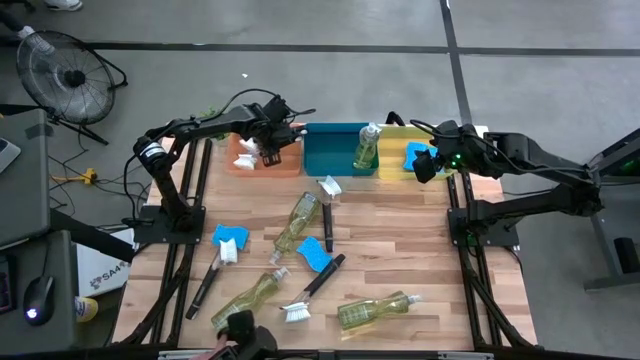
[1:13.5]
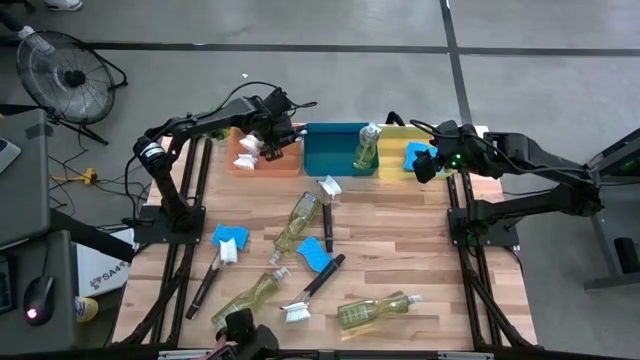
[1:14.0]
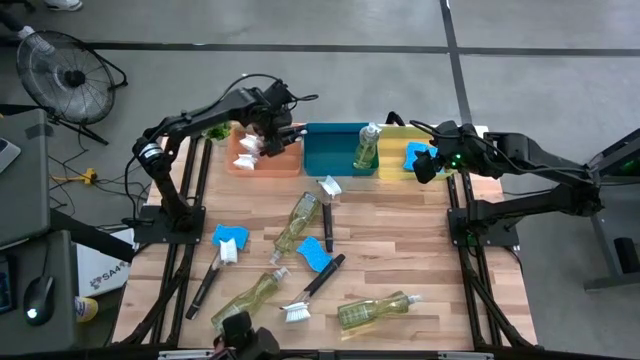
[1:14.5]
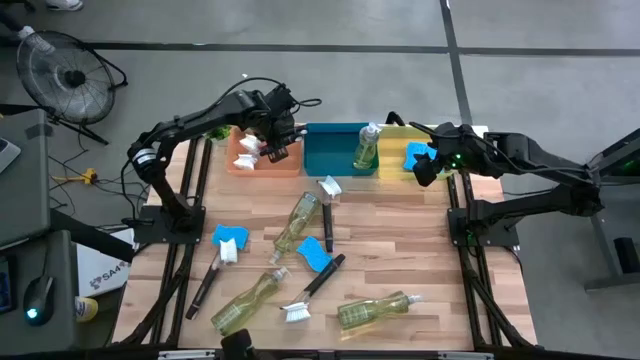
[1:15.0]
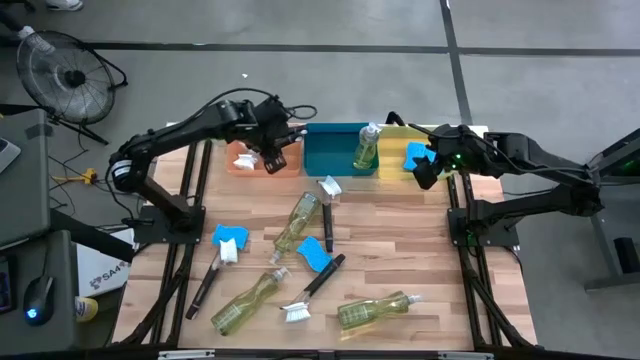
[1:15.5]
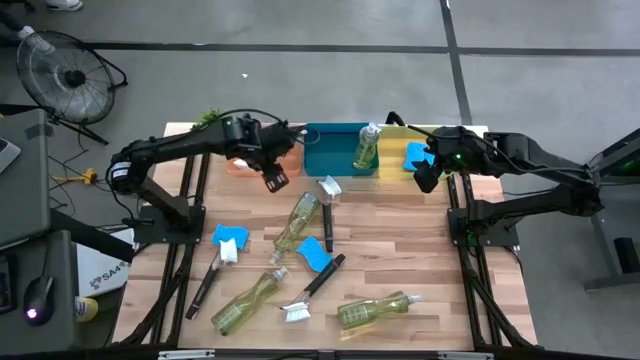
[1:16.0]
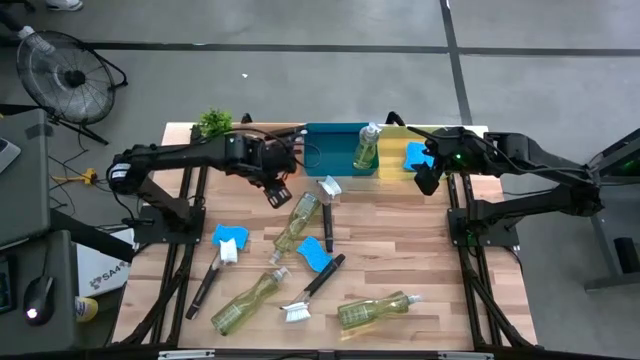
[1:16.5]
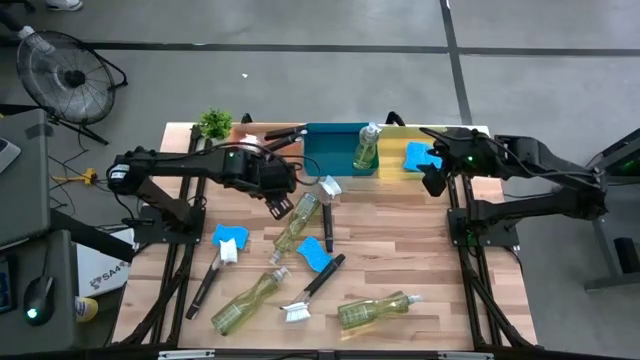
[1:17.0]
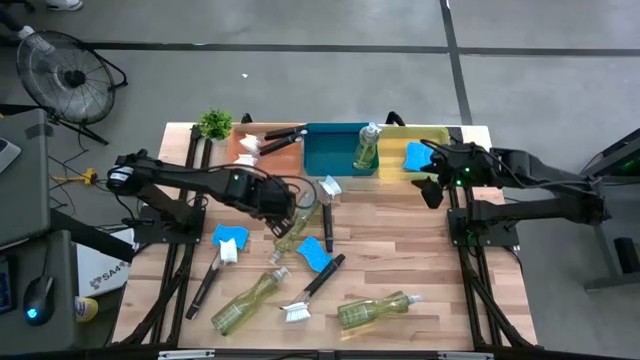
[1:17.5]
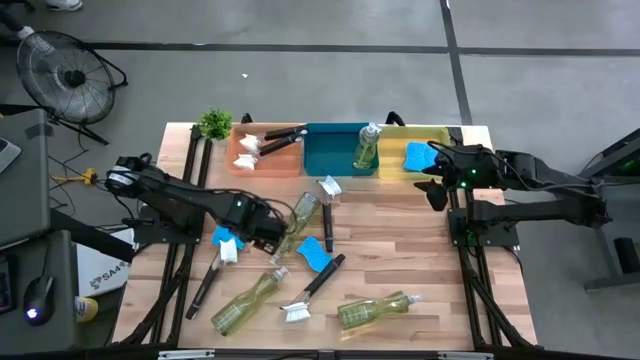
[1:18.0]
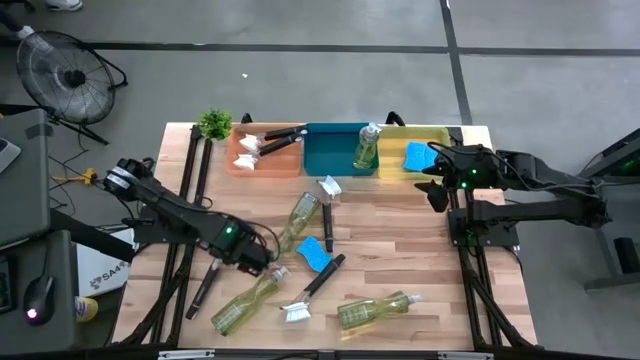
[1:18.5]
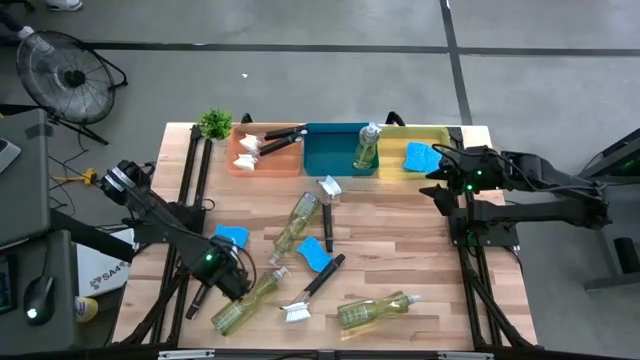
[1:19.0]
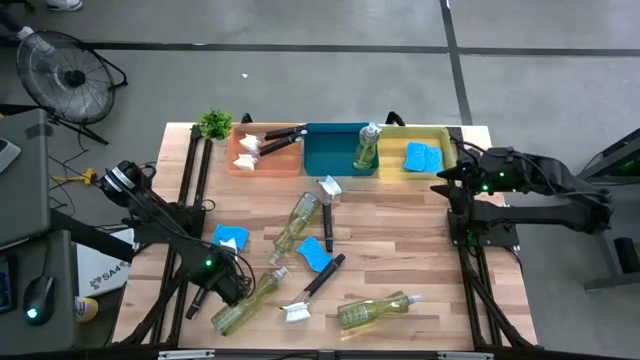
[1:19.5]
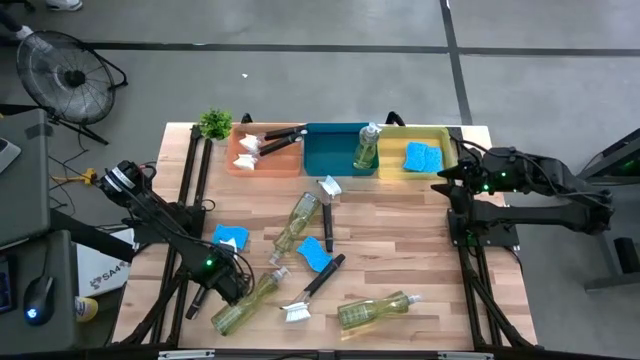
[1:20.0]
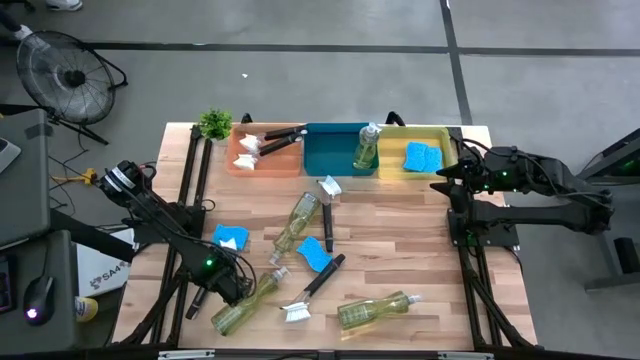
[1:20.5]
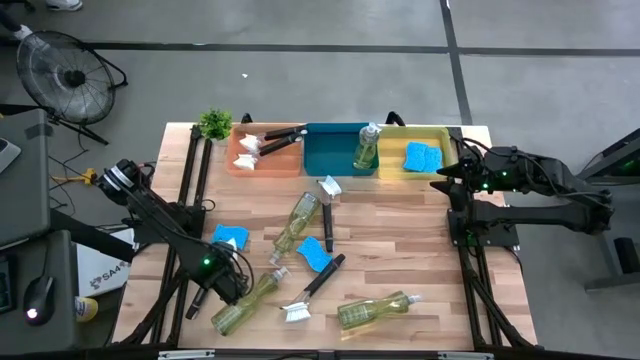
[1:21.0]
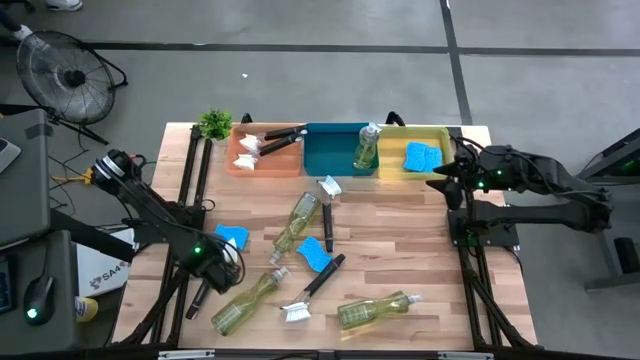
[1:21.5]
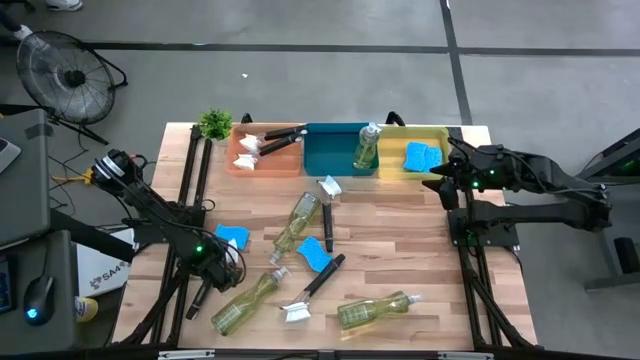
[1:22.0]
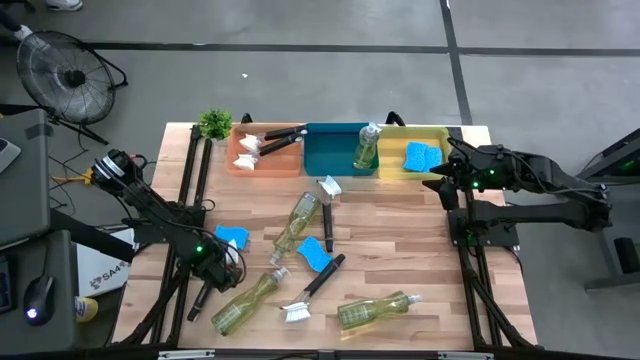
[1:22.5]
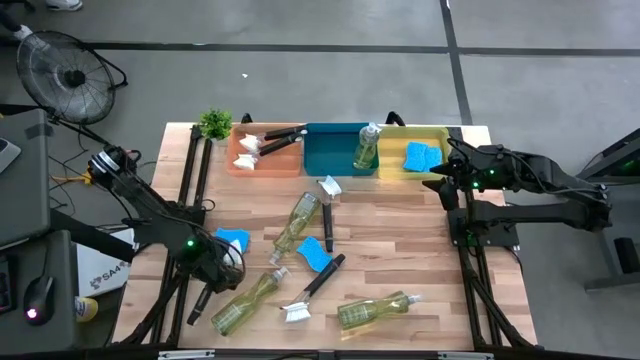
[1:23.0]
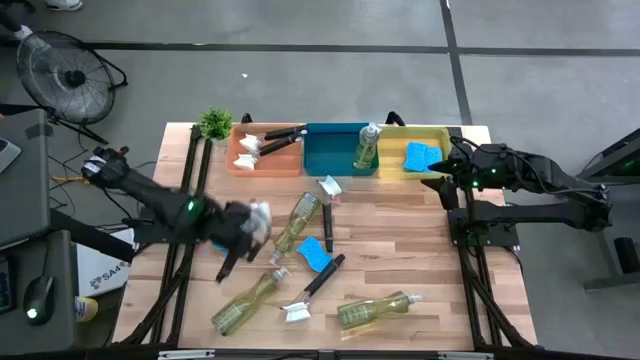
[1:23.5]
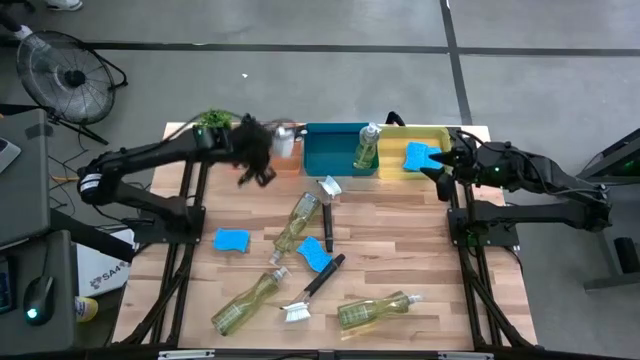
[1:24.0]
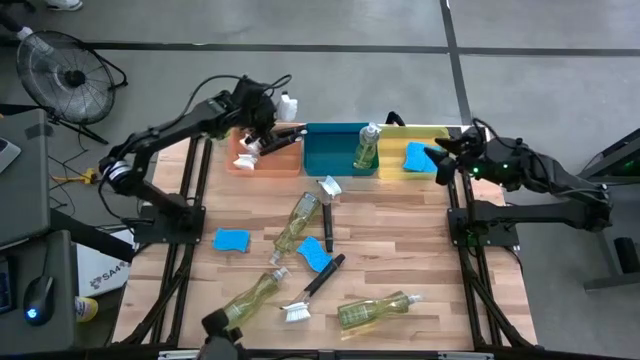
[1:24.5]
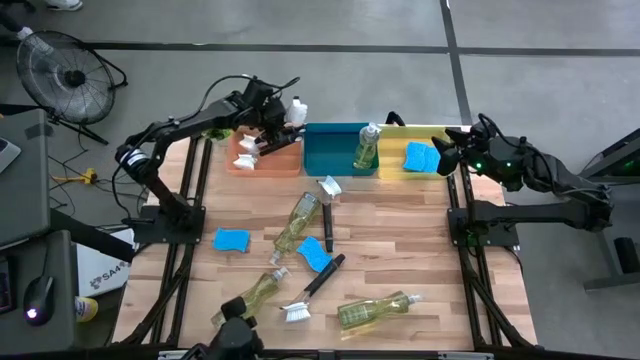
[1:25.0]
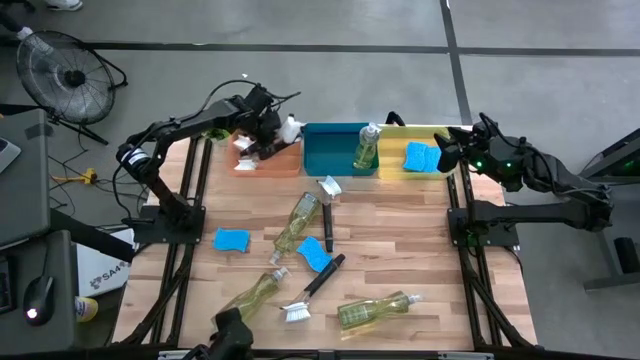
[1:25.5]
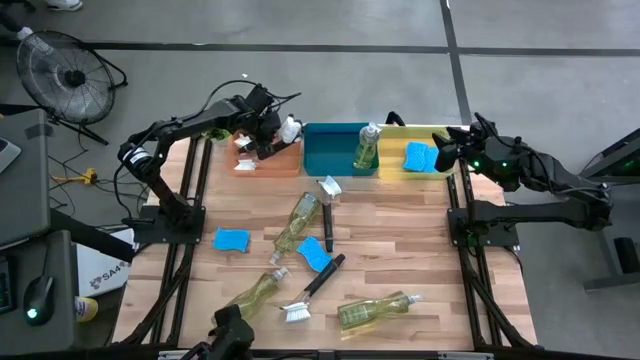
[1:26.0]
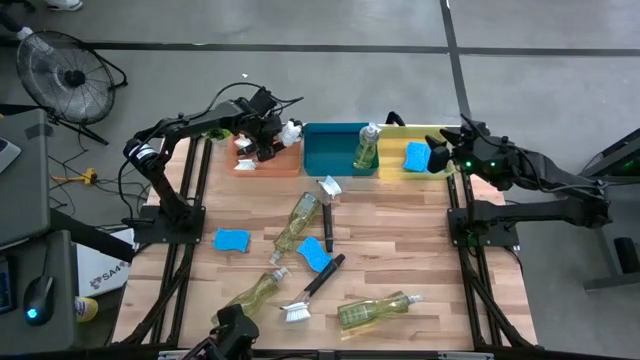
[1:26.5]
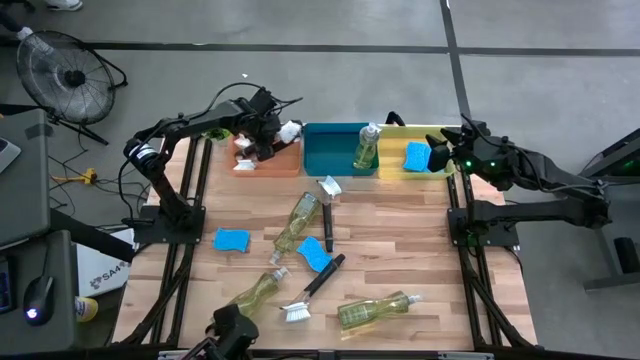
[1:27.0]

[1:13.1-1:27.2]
Task: Pick & Place Kitchen Sink Supplies
Put the cleaning brush into the orange bin

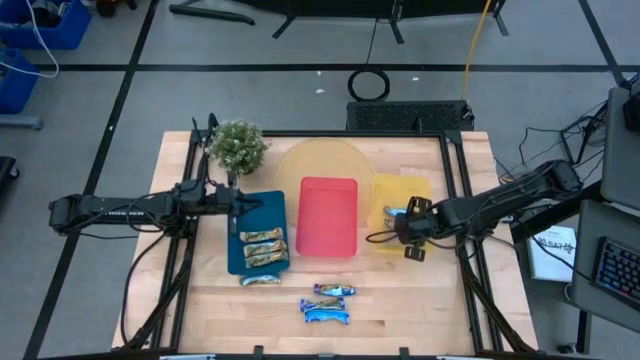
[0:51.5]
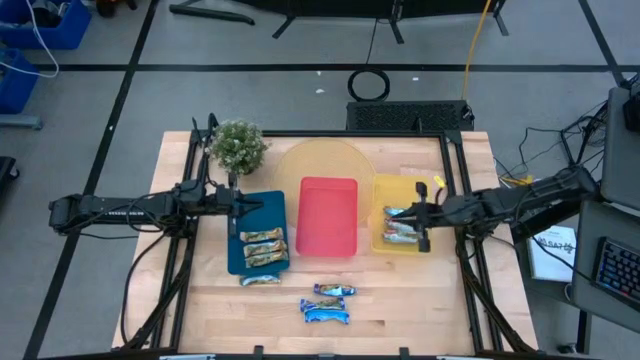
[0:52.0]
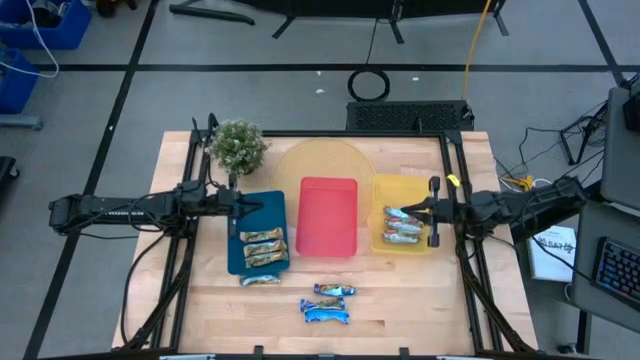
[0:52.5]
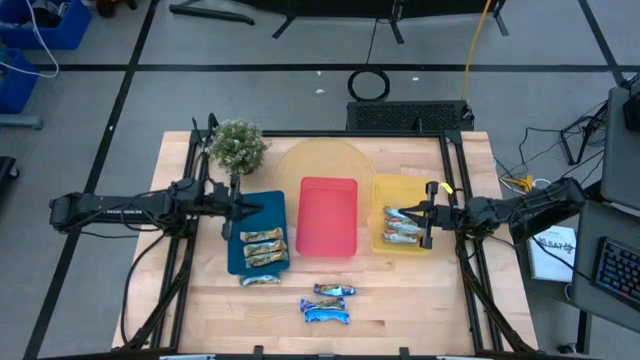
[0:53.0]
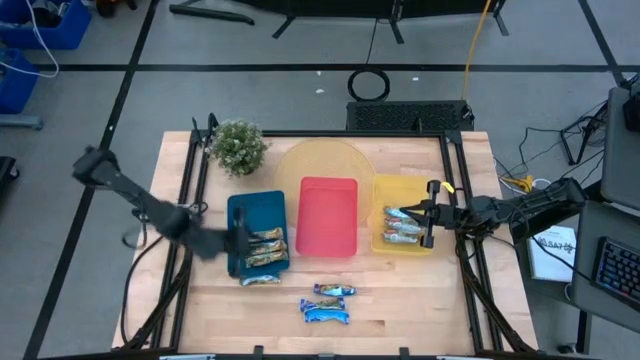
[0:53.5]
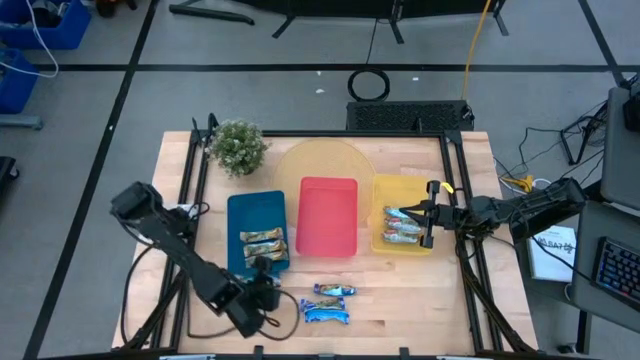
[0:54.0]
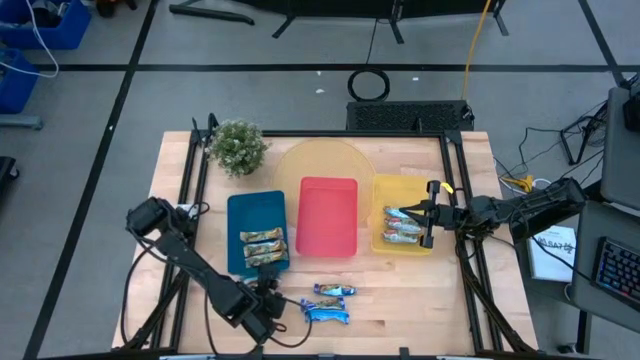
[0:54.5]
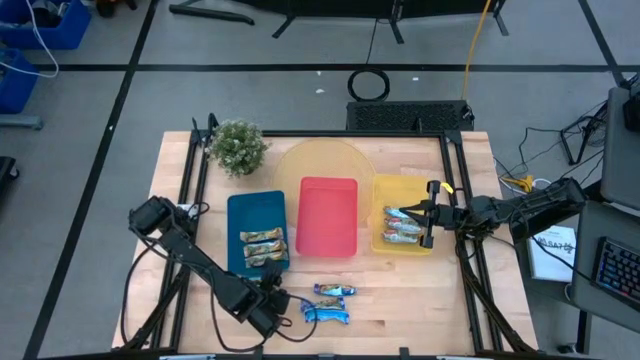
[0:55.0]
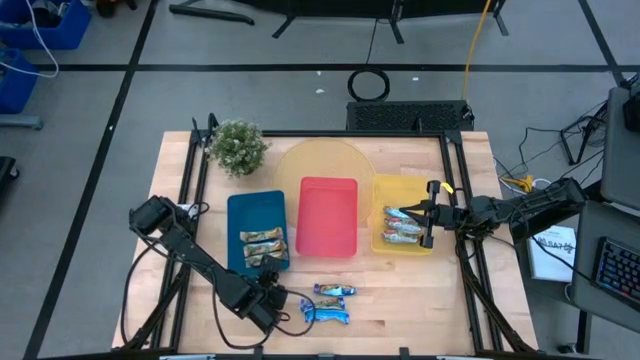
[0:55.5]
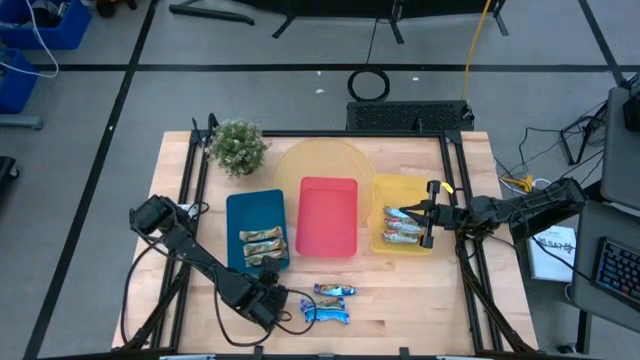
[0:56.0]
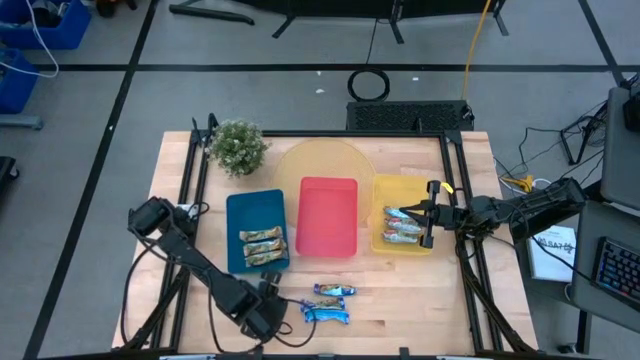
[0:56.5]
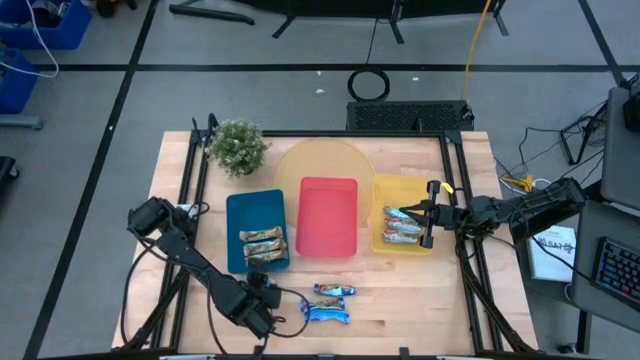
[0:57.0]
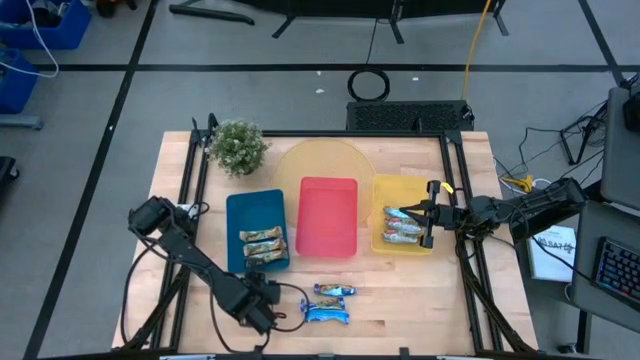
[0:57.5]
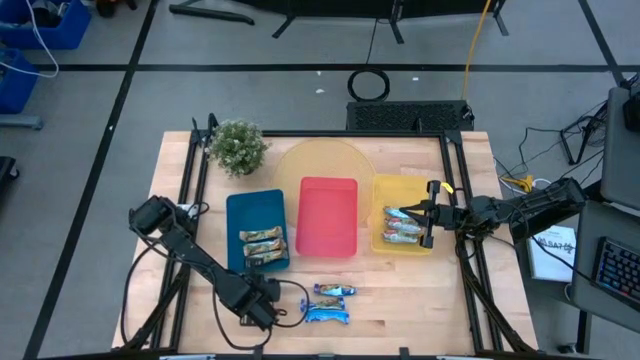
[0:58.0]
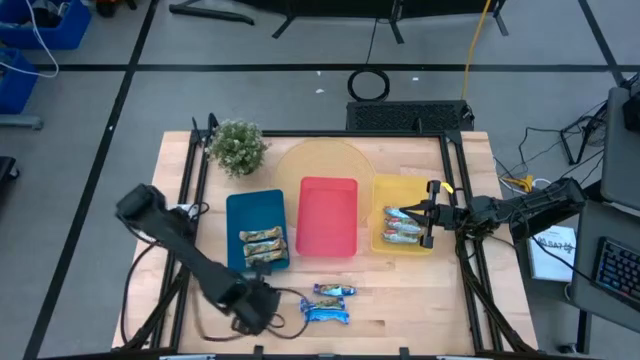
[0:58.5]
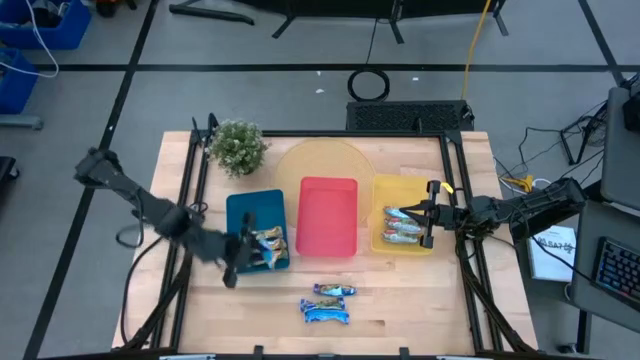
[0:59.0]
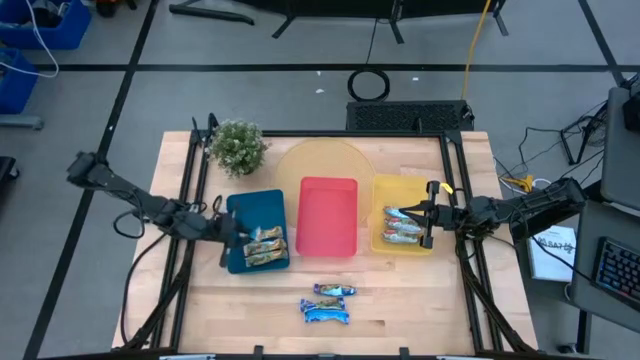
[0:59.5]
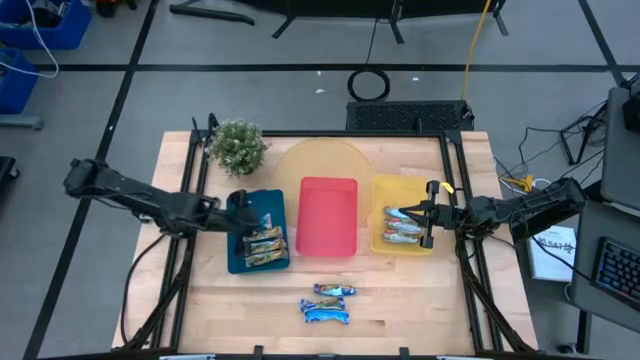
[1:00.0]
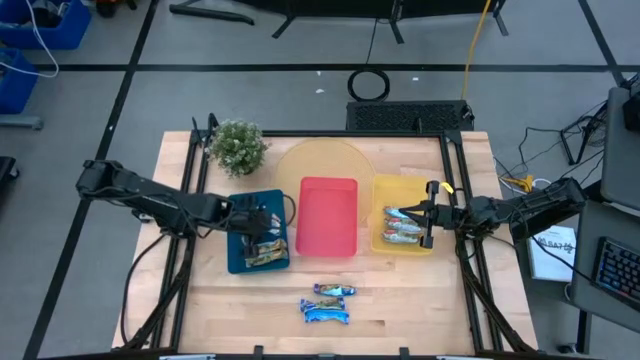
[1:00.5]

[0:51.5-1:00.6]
Task: Pick and place Granola Bars by type
Put the yellow granola bar into the blue bin
